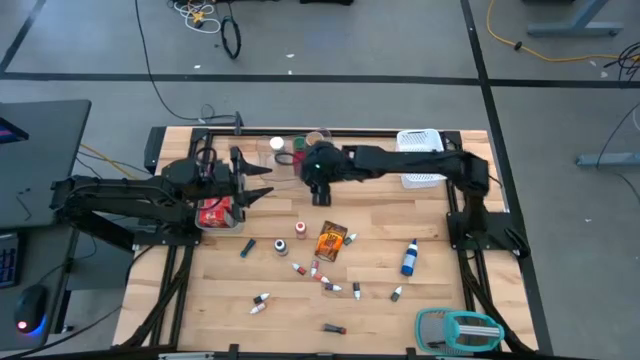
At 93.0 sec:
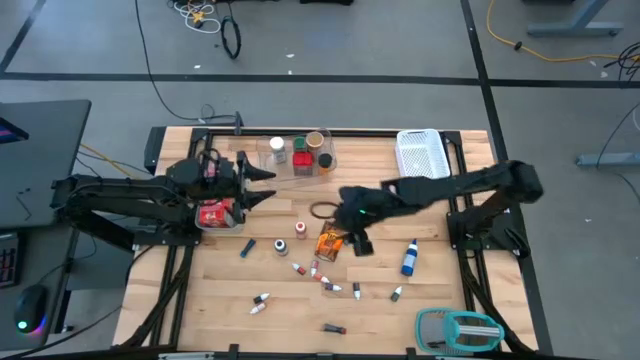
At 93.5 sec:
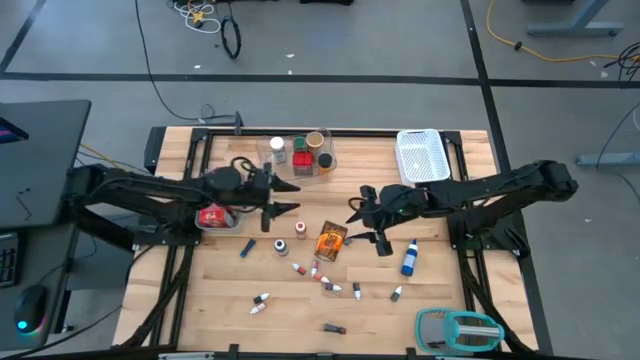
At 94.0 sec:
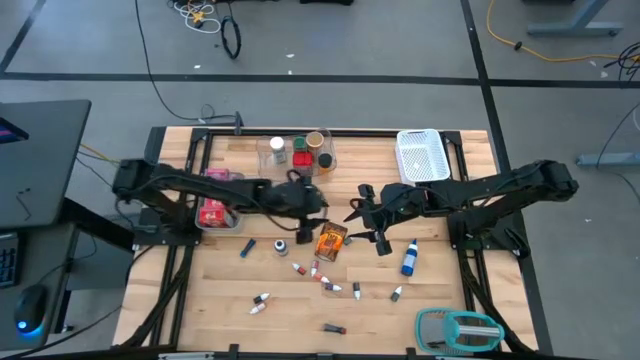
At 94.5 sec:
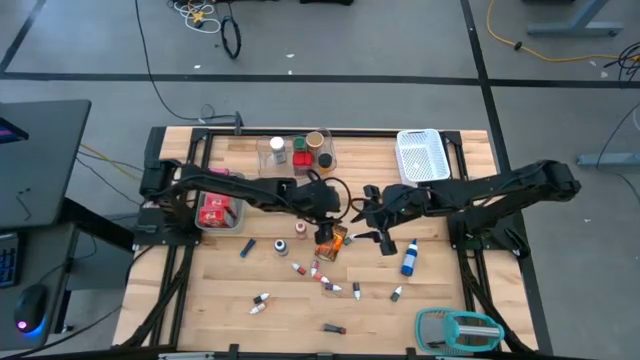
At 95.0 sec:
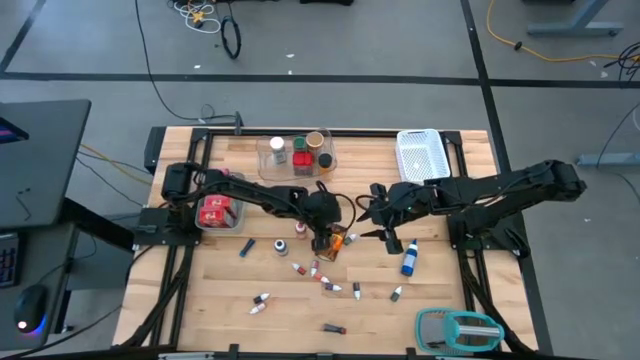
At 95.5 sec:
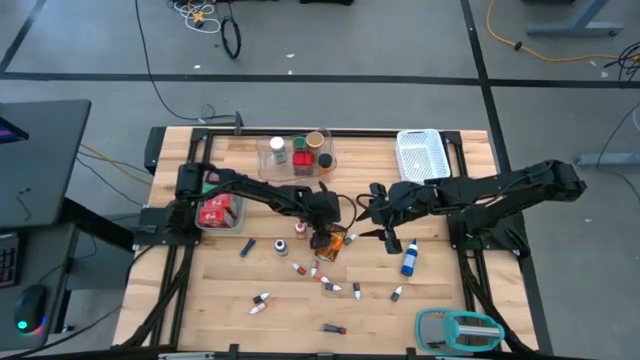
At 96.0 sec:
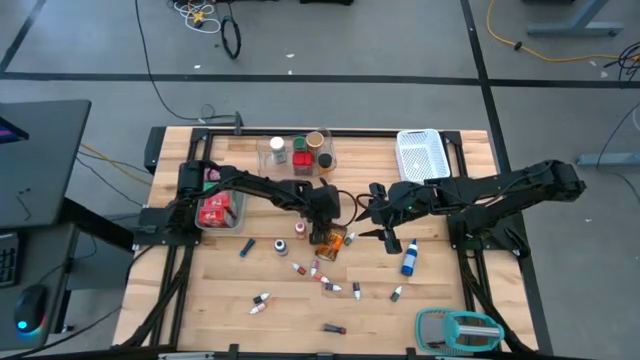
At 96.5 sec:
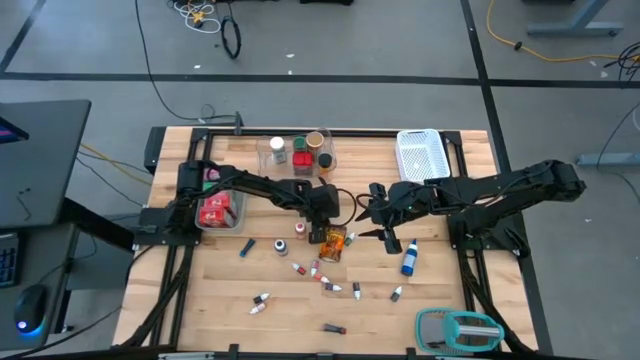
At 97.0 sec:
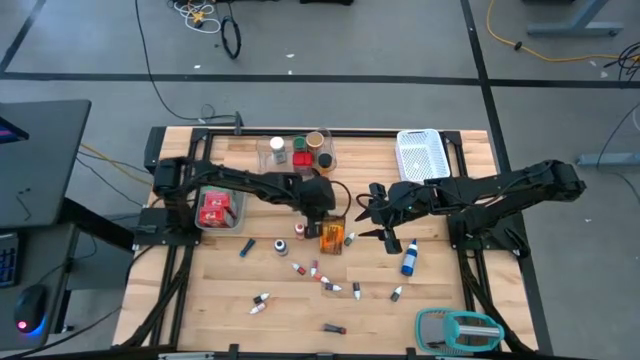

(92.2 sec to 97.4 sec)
Task: Pick & Place Kitchen Items
Put the orange seasoning pack into the transparent bin

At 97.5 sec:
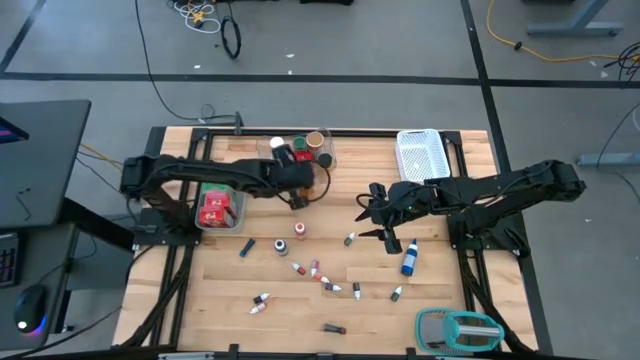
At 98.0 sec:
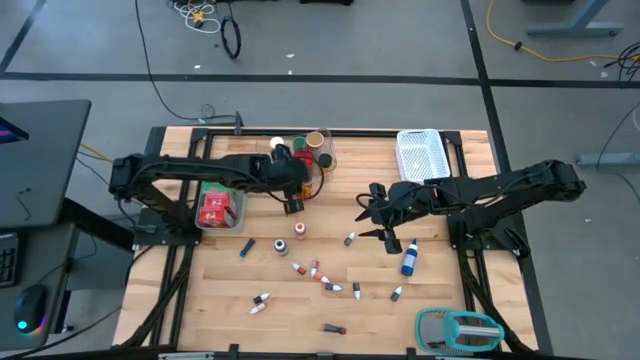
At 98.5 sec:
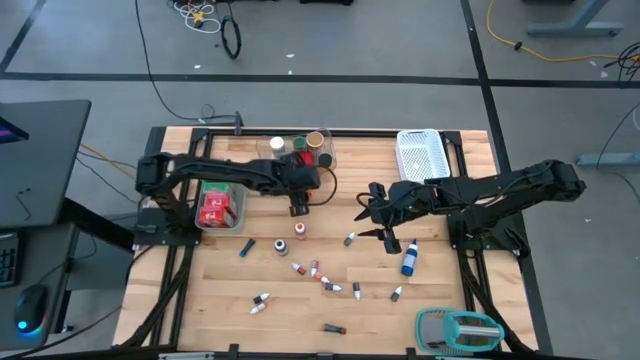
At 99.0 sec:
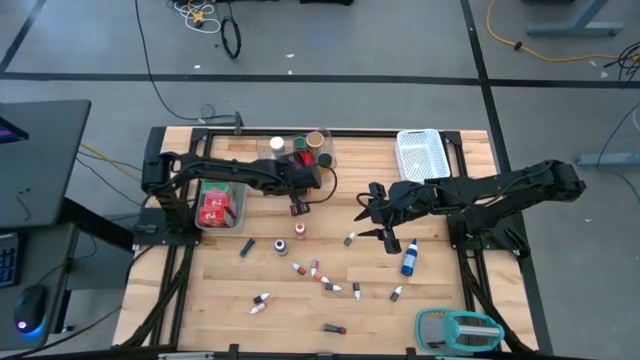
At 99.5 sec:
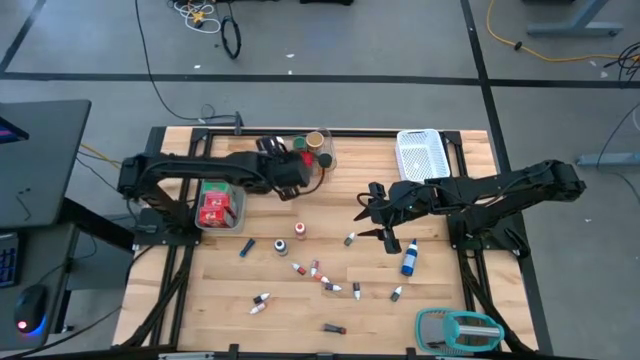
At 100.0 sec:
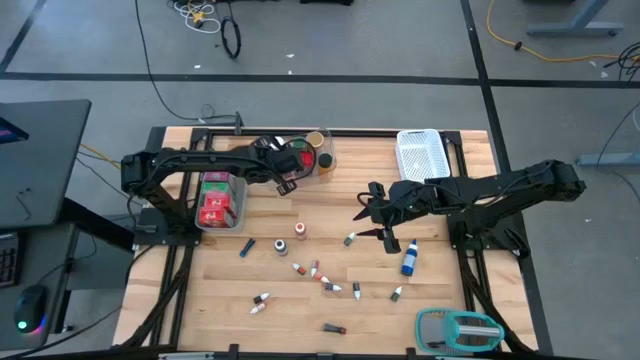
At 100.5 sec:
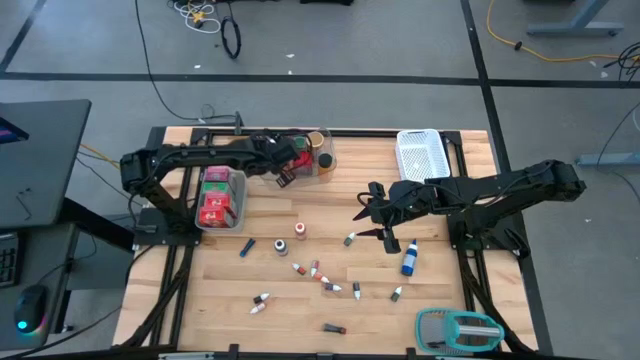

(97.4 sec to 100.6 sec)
Put the orange seasoning pack into the transparent bin

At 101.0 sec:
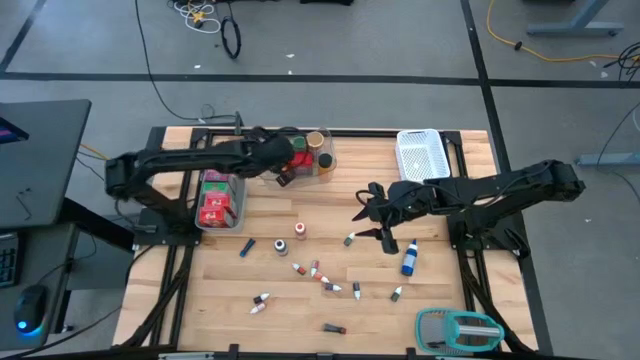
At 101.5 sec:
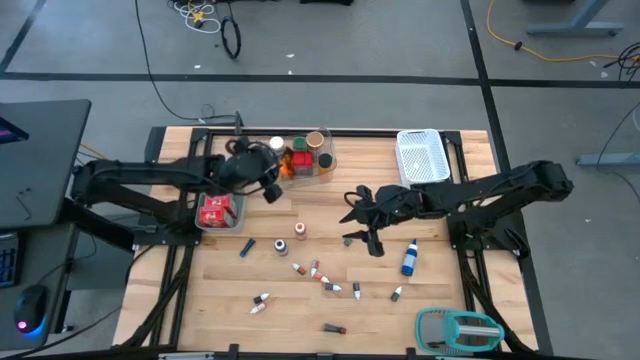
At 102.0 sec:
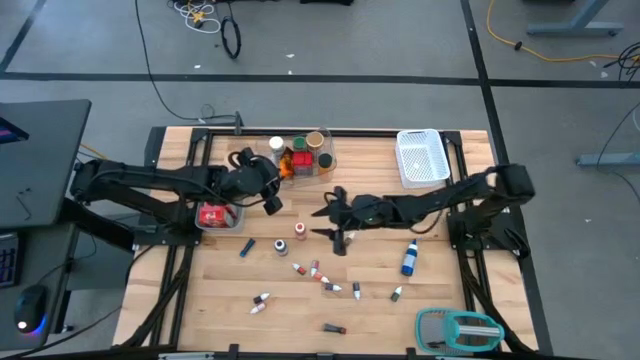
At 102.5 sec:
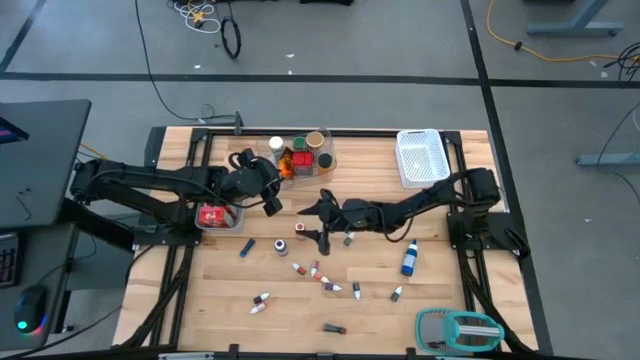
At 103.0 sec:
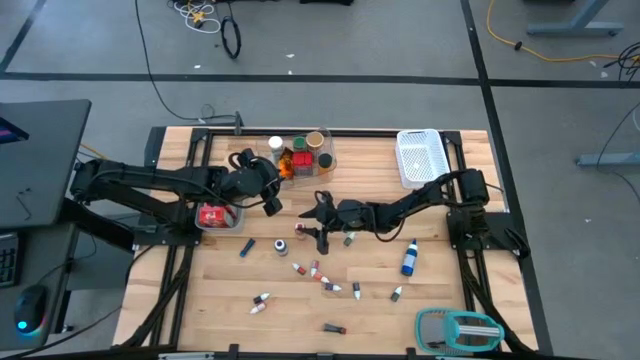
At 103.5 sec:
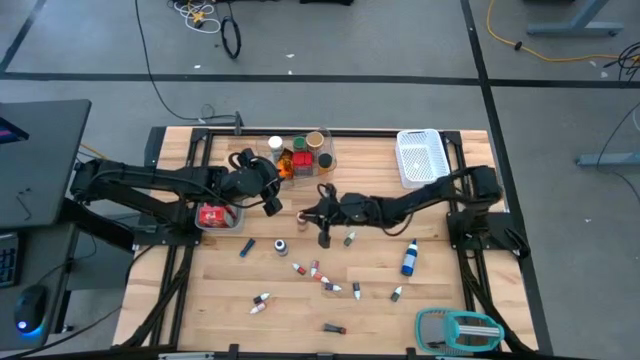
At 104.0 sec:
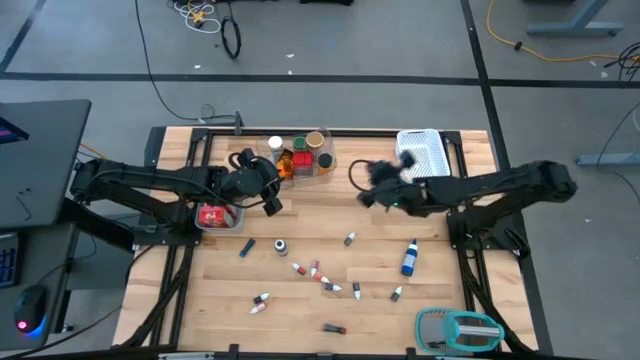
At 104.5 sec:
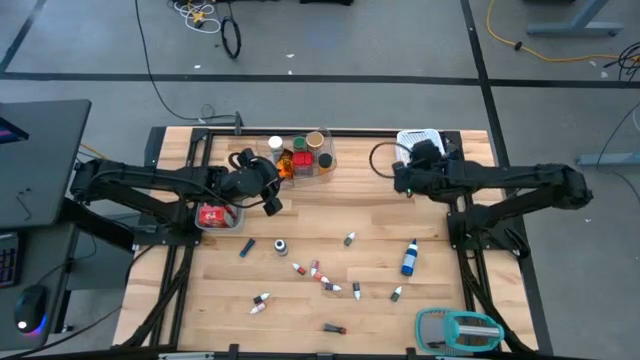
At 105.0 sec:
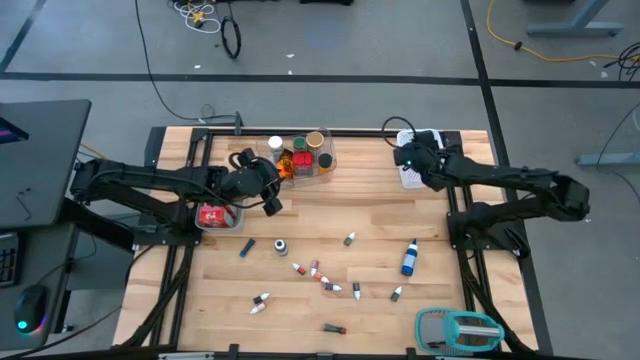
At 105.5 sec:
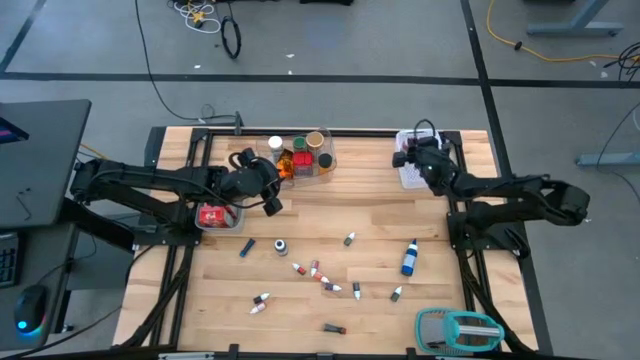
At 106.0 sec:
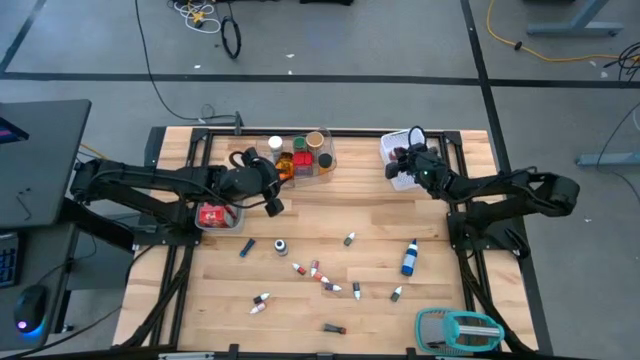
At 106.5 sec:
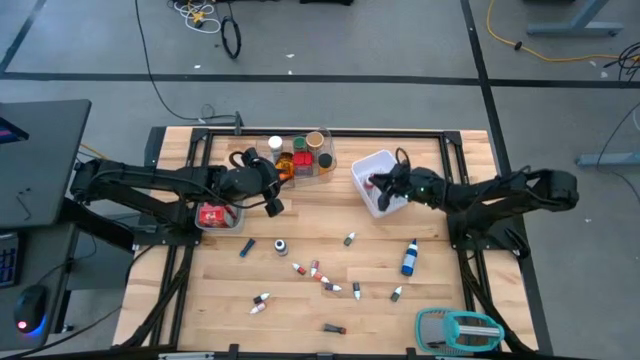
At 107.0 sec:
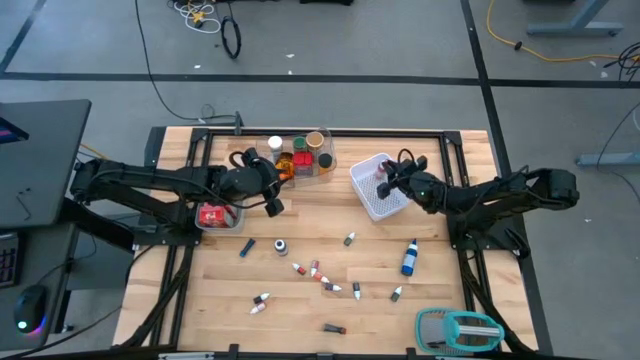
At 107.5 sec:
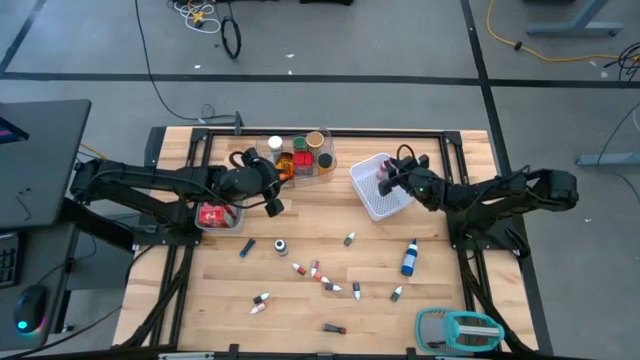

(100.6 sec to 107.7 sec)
Put the big red food coloring bottle into the white bin

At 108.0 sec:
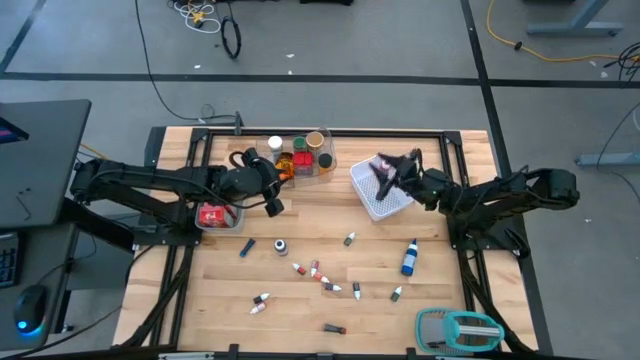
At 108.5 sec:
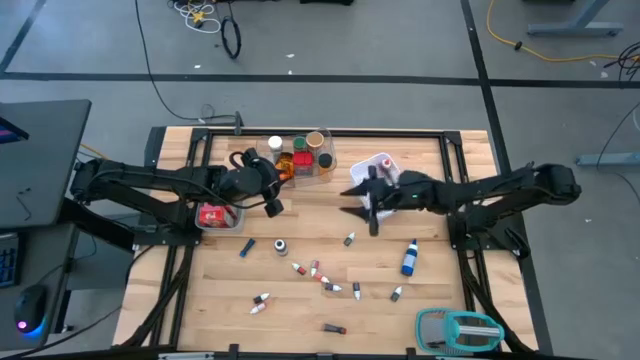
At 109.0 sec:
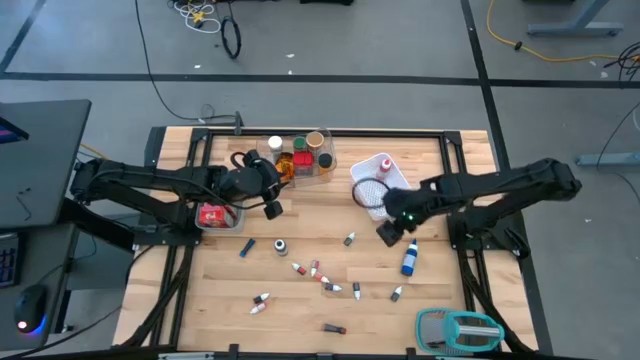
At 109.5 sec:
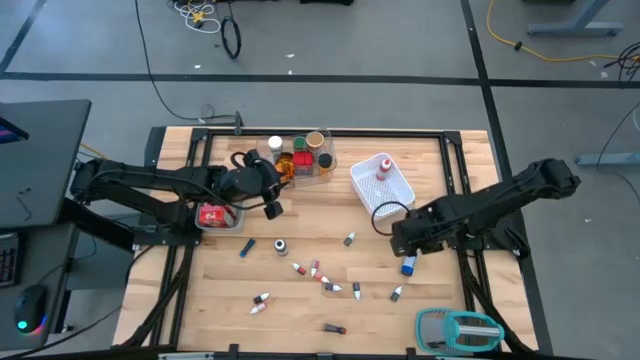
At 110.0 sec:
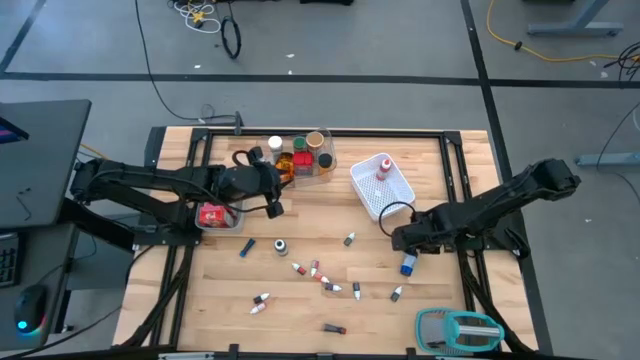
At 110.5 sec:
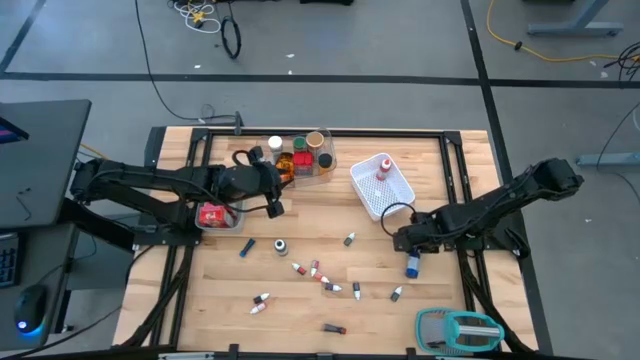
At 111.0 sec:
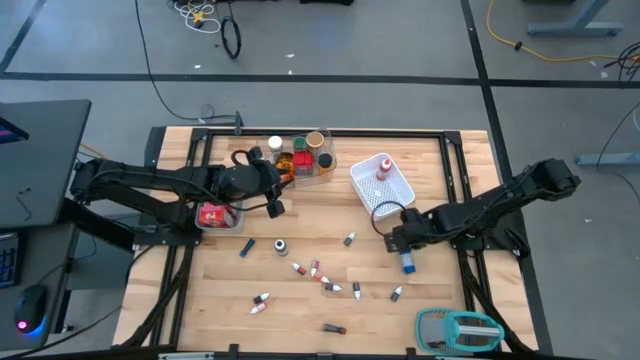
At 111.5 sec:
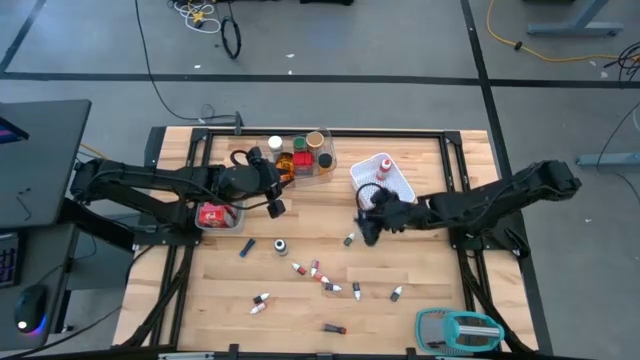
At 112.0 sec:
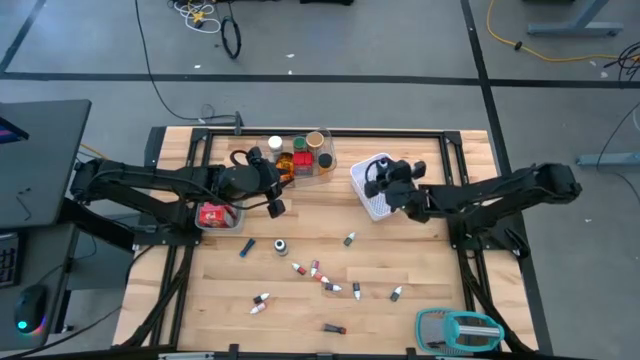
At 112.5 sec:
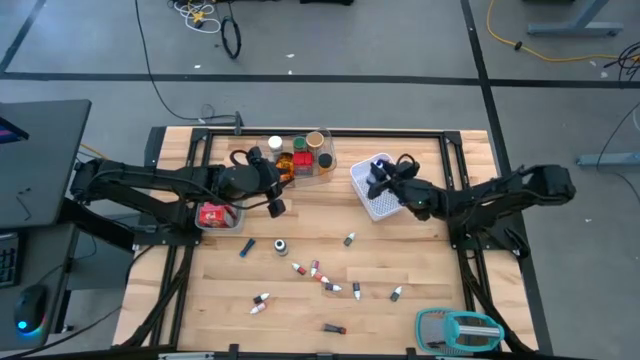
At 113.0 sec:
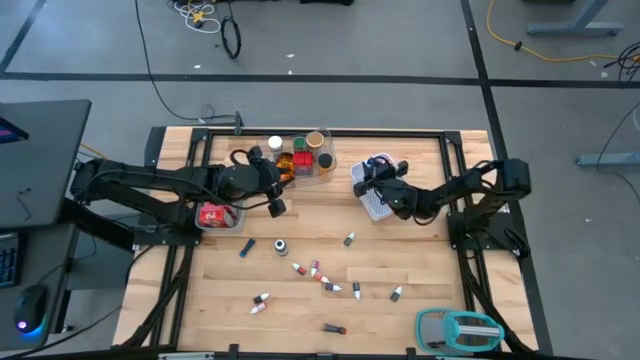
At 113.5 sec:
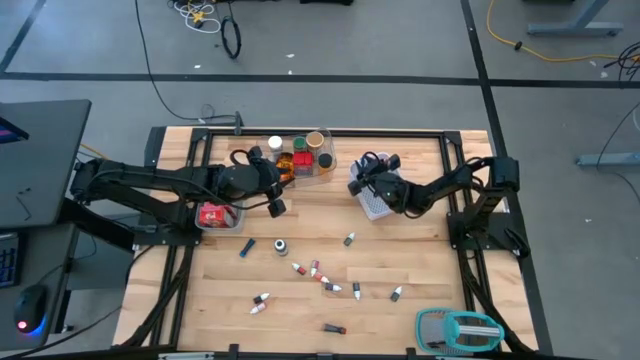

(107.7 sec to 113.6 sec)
Put the big blue food coloring bottle into the white bin
